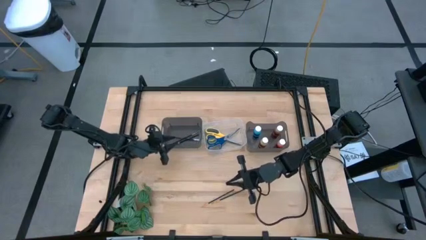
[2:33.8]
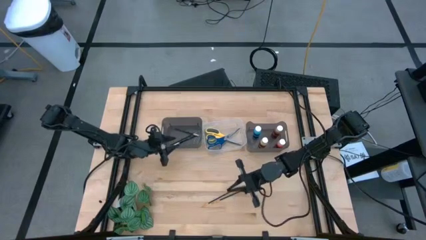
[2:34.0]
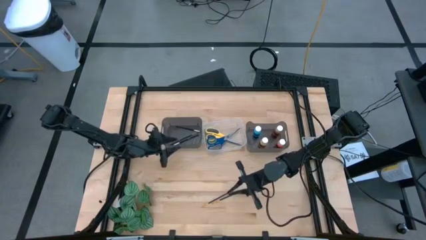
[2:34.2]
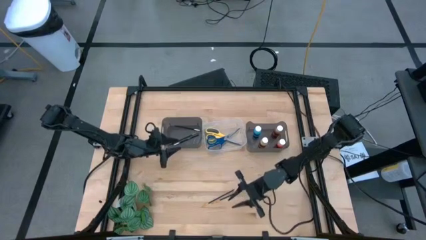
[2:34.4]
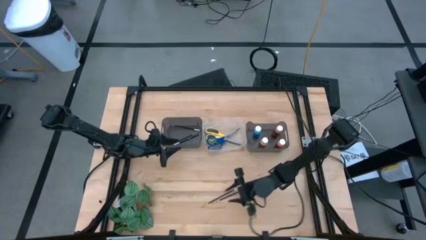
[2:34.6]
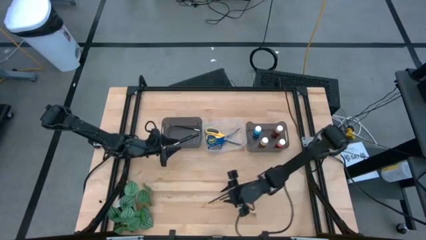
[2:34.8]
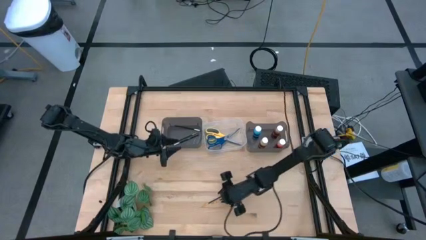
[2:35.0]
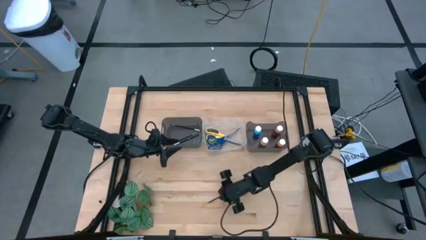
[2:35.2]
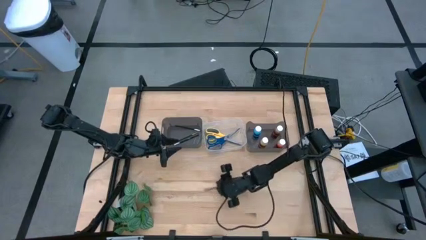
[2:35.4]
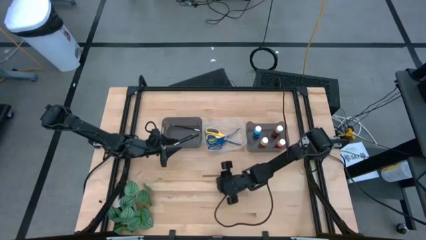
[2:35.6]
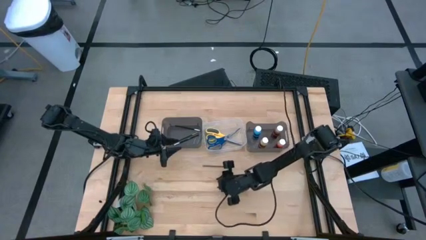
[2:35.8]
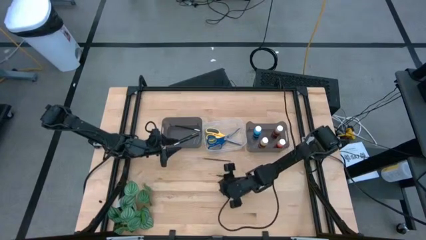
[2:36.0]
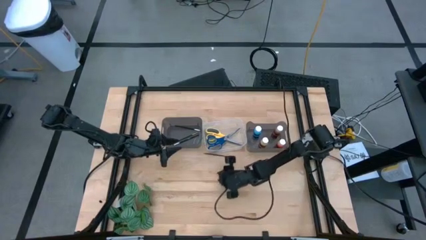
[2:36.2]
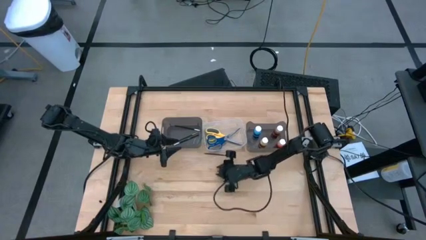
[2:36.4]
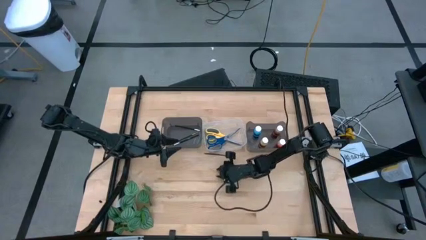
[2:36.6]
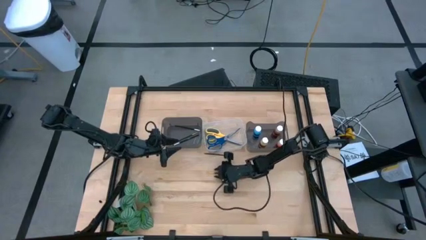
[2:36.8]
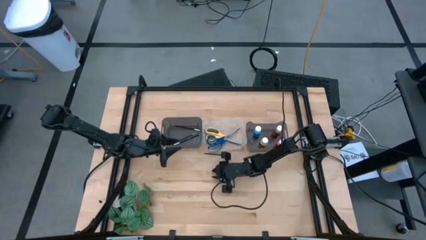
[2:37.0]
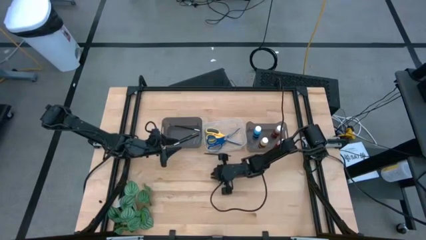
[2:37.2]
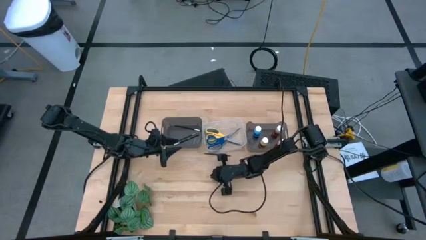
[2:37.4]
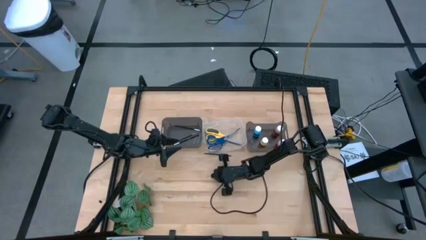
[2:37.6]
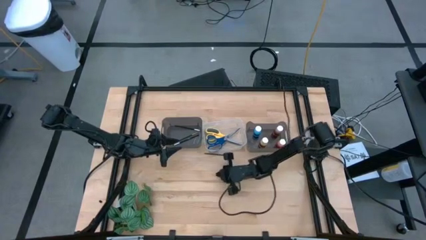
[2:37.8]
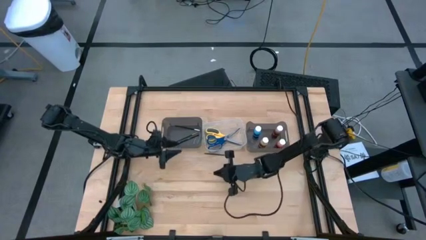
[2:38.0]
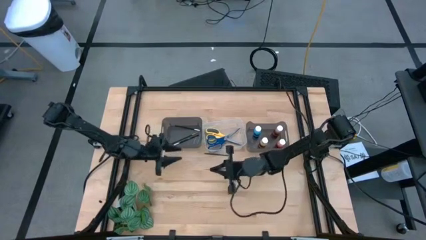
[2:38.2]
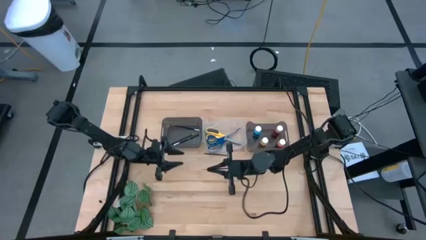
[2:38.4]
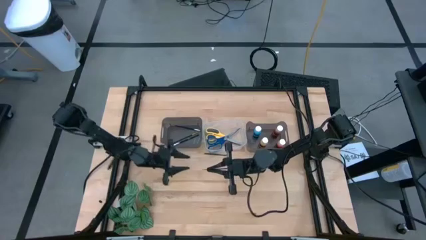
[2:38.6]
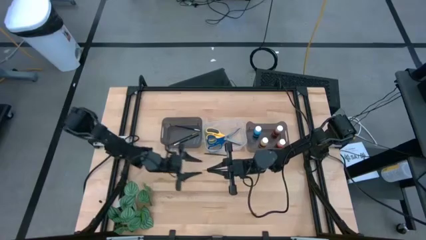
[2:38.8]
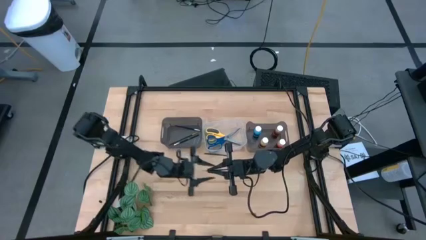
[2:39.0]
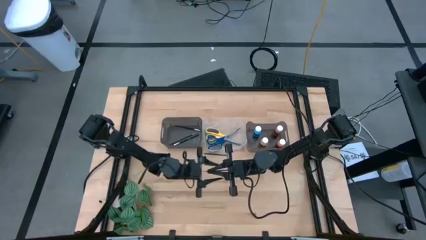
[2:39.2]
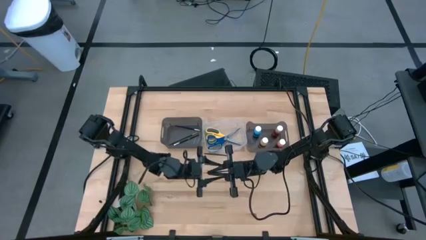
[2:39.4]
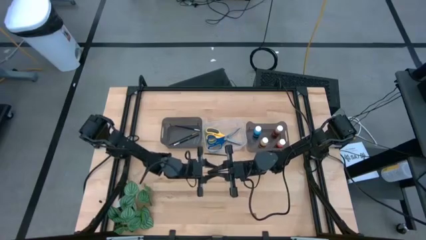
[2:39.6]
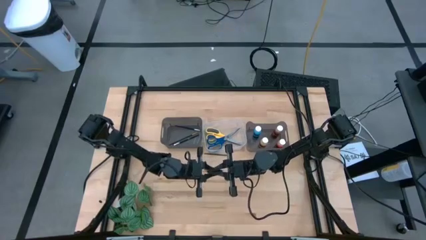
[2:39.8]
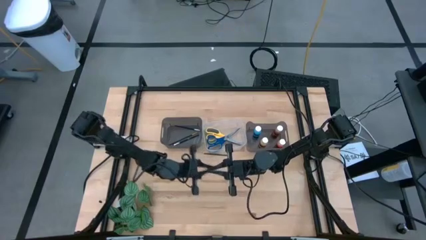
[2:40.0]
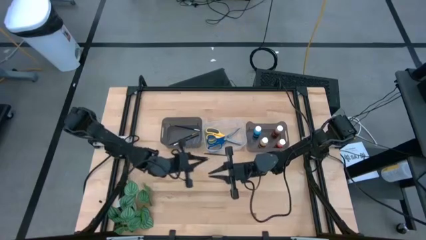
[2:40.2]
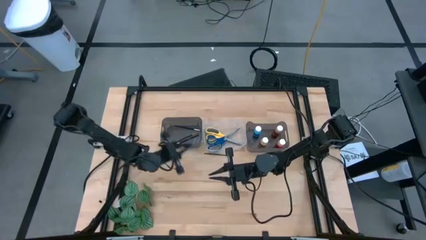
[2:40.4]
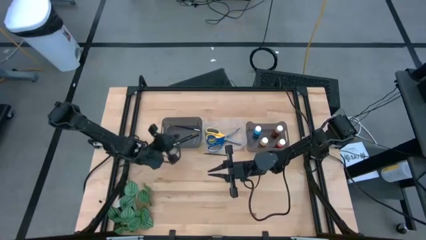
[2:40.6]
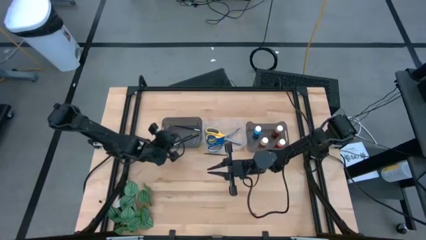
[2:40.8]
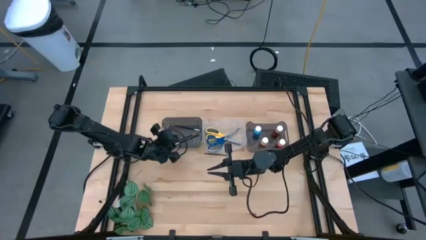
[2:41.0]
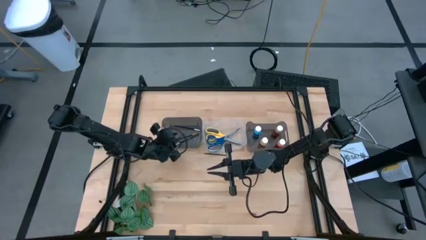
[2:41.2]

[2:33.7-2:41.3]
Task: Pick & Place Paint Supplies
Put the bottom gold black paint brush into the left black bin

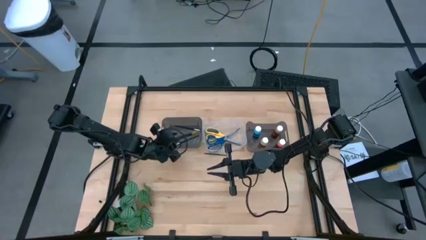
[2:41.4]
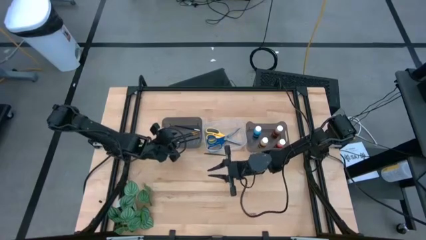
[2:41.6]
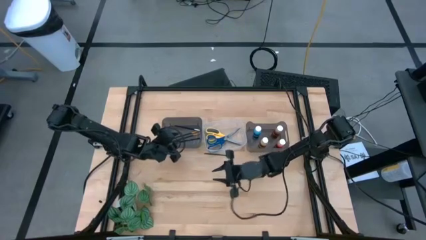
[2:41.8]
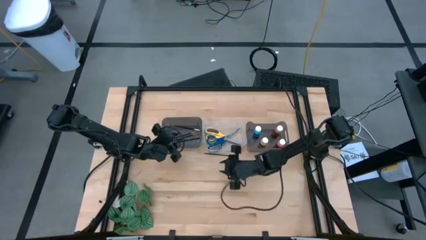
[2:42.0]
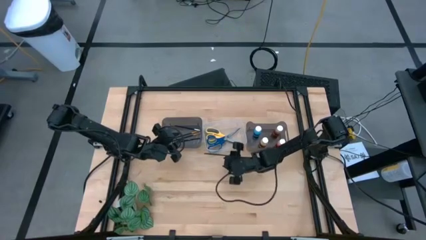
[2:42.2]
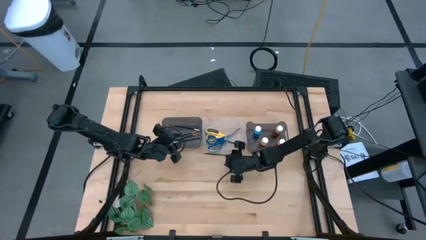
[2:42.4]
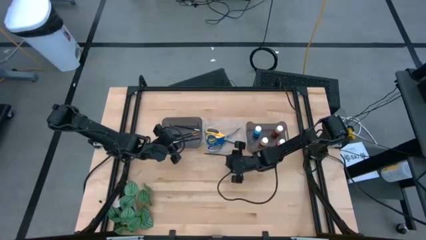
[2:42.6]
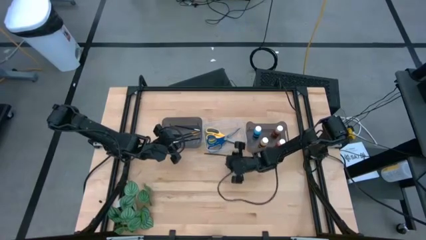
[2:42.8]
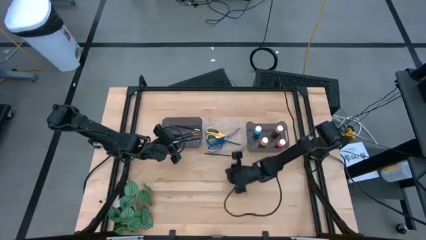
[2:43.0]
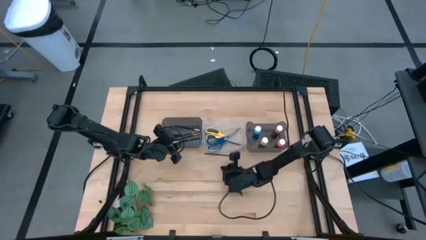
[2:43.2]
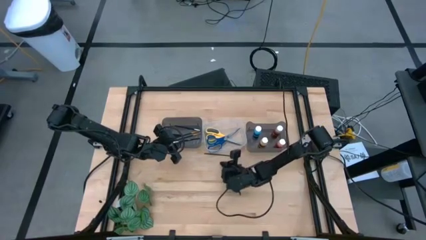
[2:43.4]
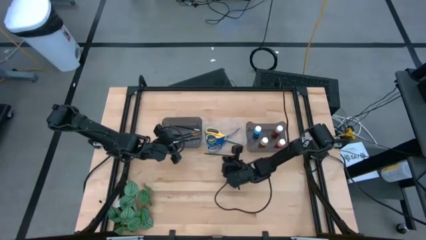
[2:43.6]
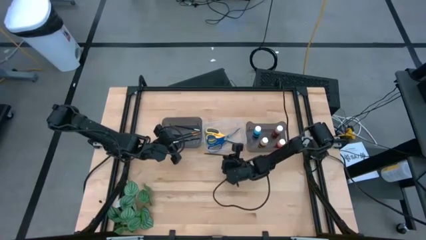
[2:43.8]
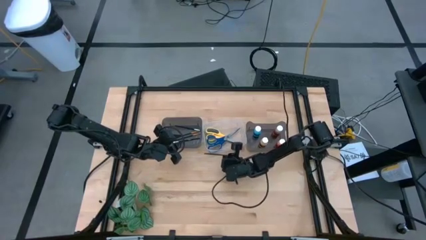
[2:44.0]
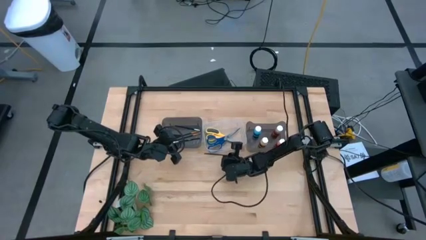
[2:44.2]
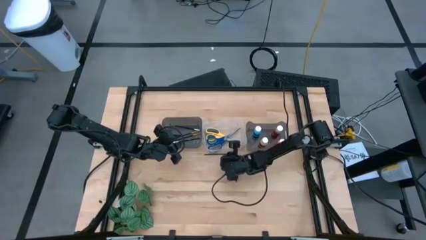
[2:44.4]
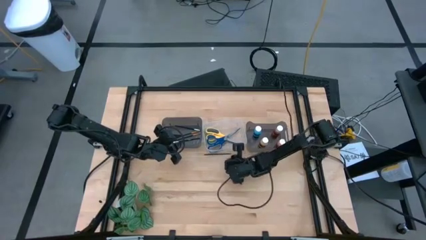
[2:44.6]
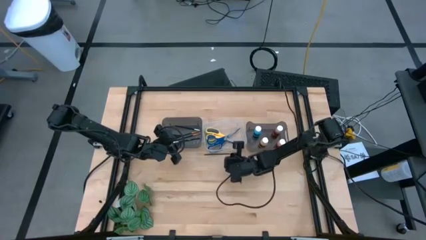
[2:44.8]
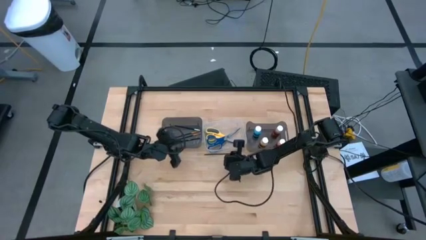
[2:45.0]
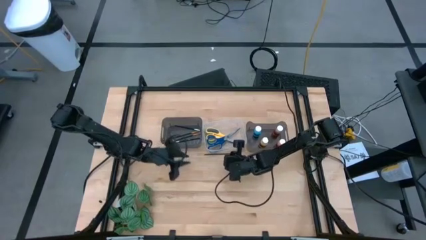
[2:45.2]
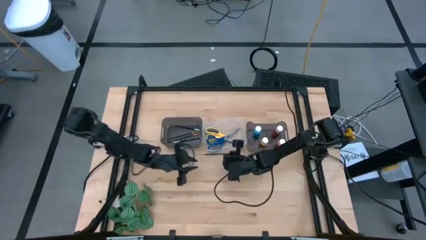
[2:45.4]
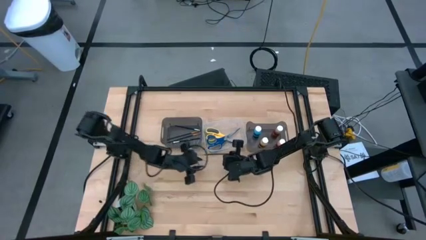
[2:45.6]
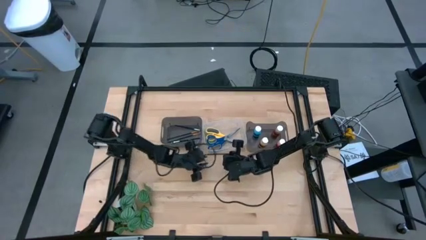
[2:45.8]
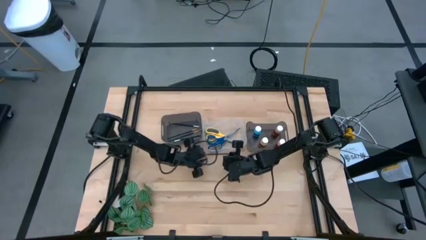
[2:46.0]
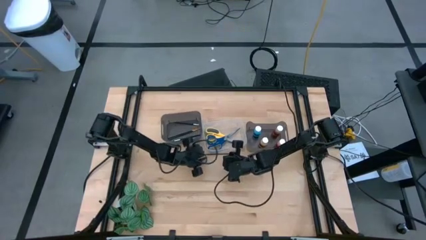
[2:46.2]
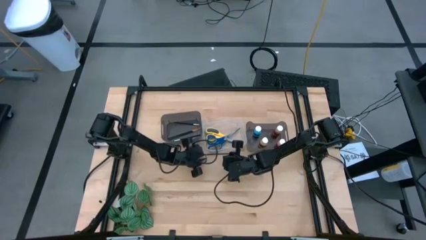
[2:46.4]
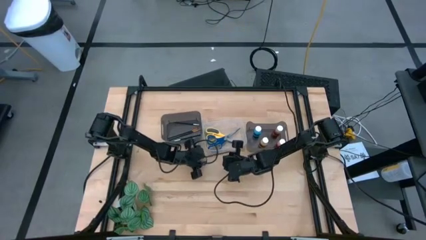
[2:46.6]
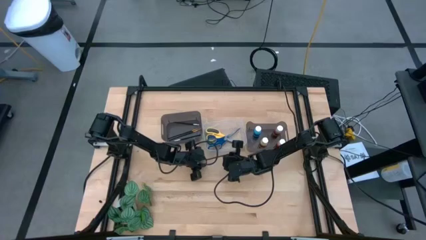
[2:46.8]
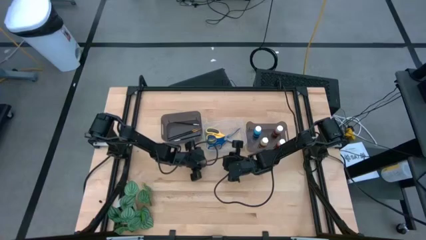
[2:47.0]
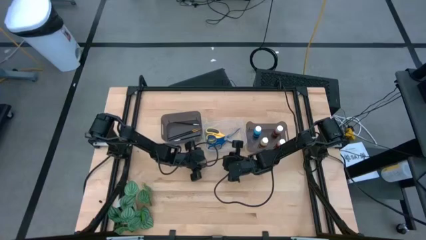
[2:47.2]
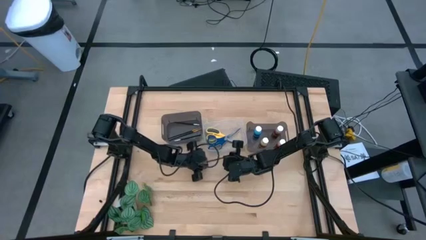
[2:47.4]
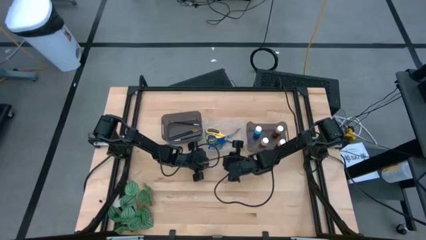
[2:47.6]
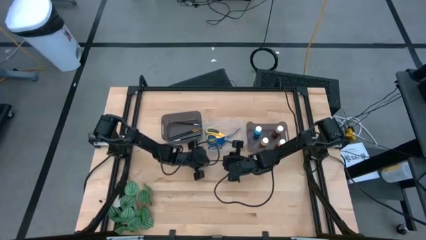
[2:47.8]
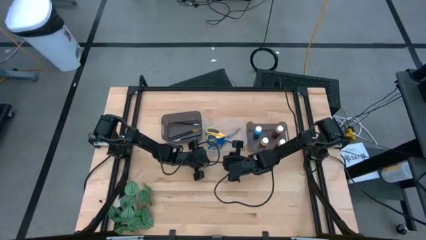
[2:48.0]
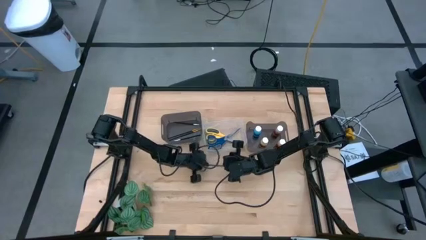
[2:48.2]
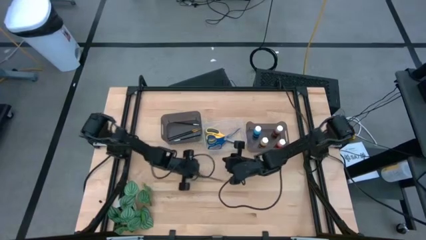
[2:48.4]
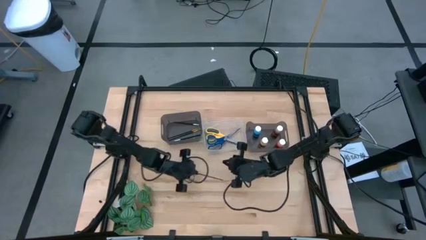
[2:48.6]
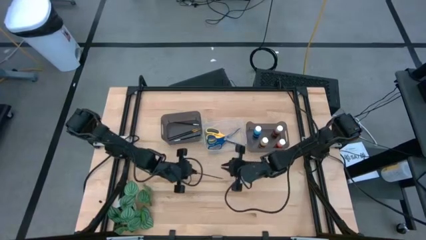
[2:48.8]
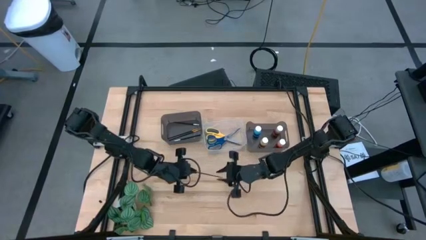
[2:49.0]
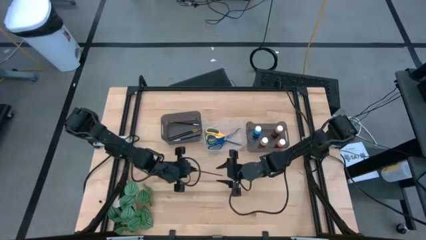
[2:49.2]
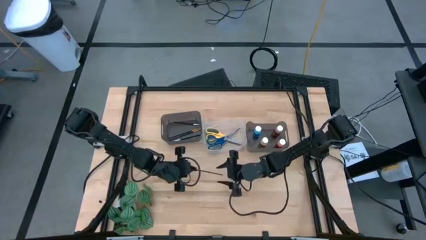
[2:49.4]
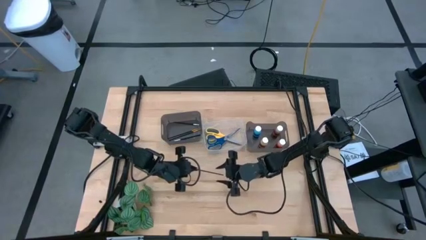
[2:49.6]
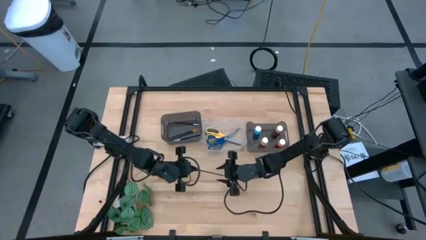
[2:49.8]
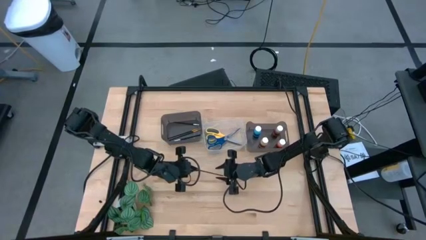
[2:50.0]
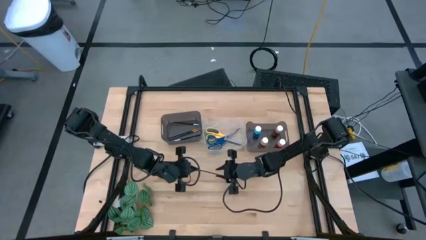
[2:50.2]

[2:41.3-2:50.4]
Put the gold paint brush into the left black bin
